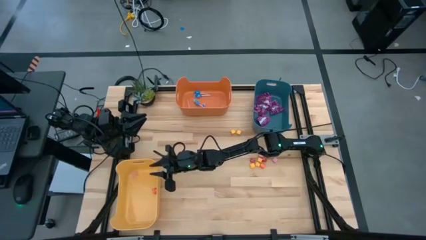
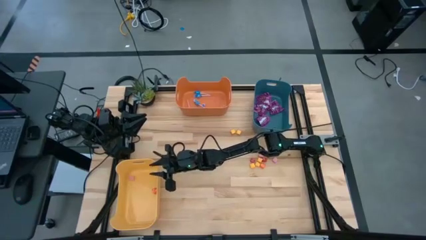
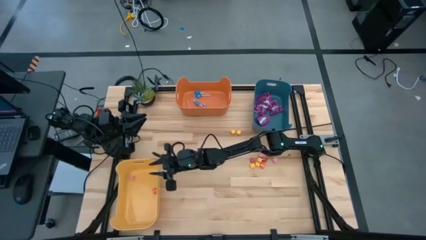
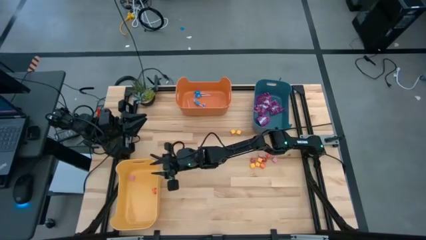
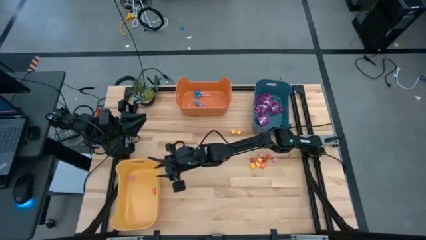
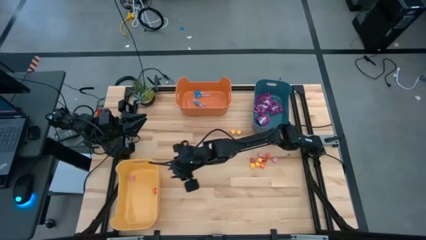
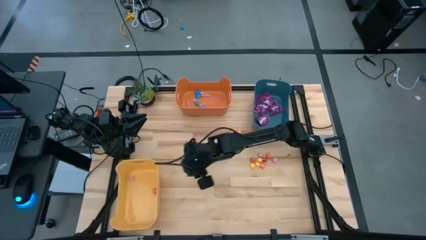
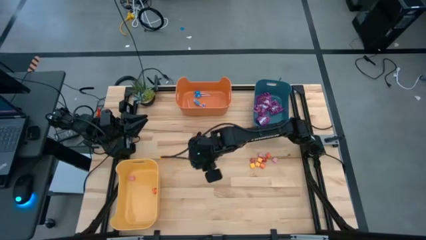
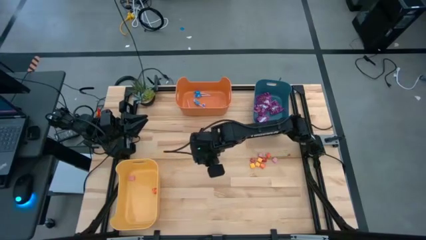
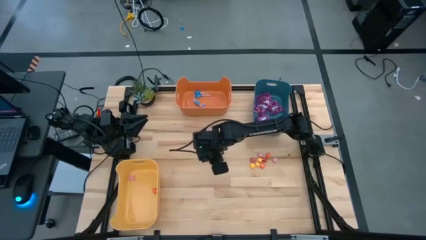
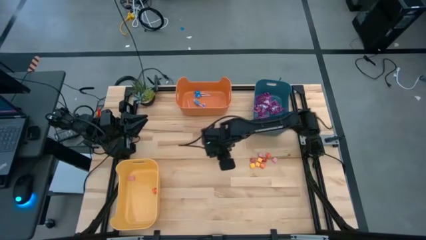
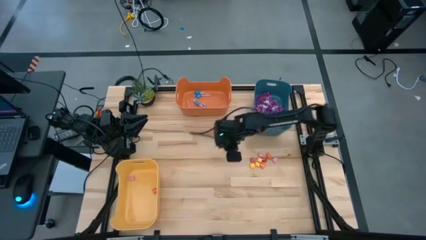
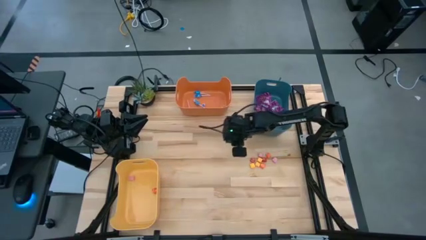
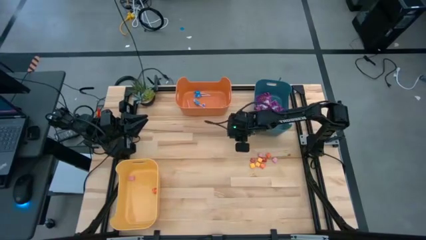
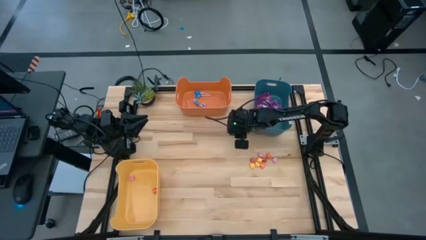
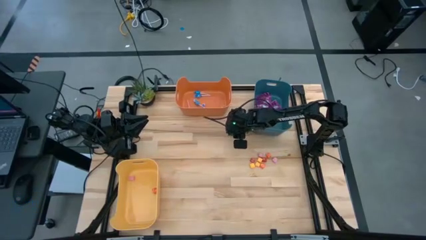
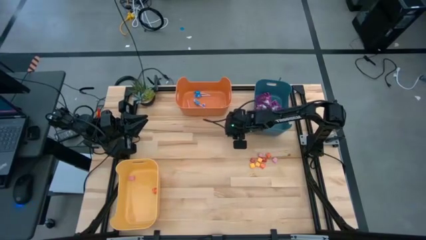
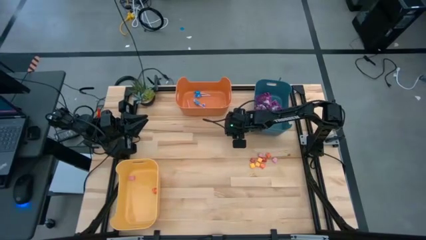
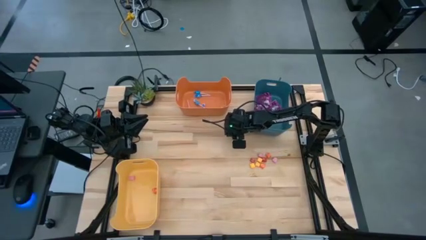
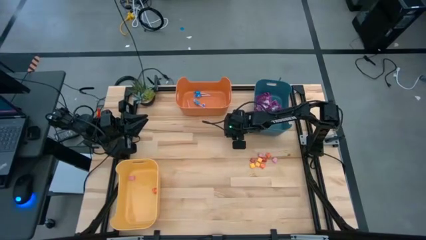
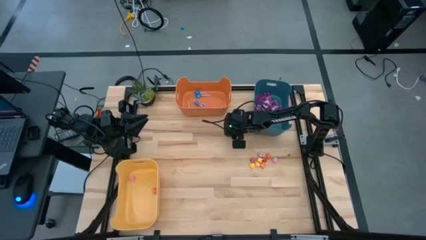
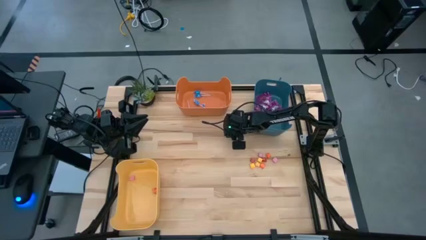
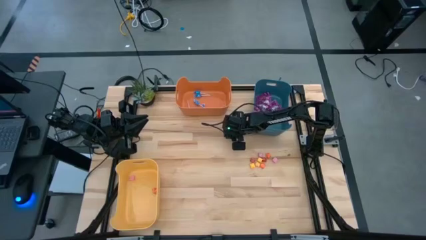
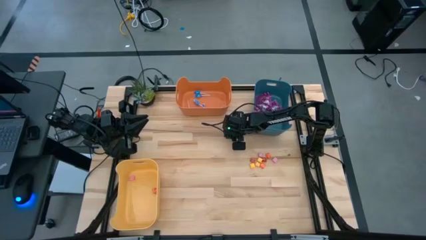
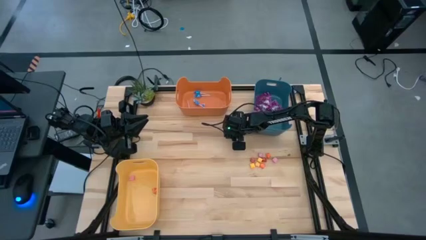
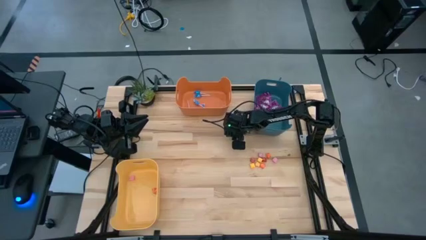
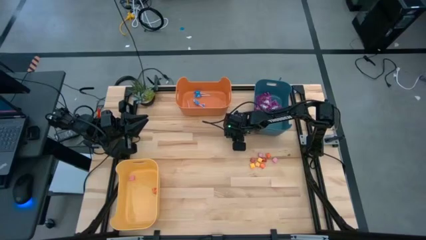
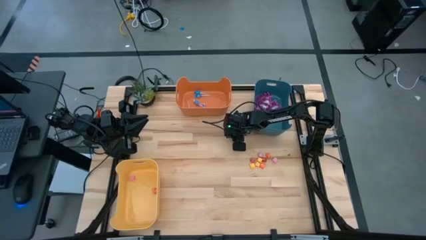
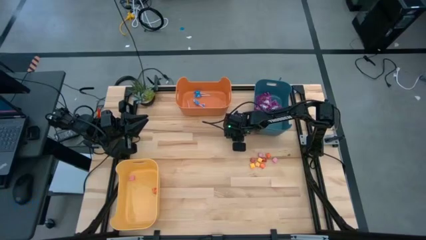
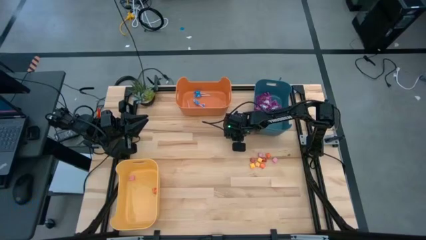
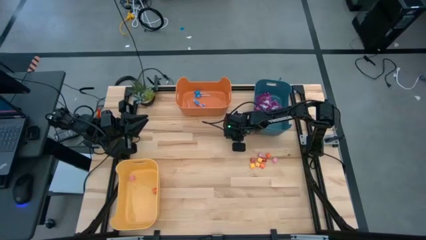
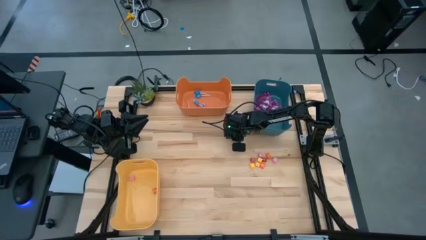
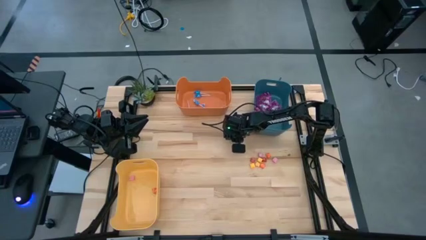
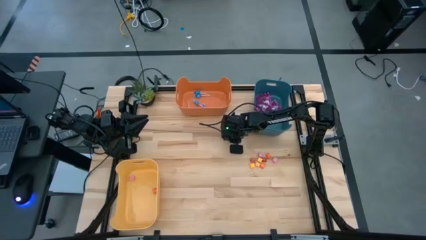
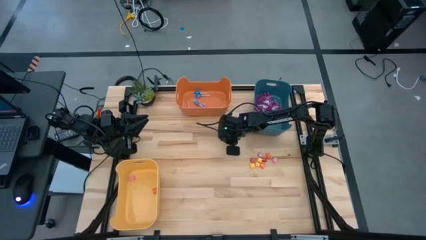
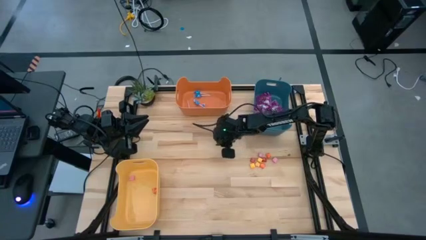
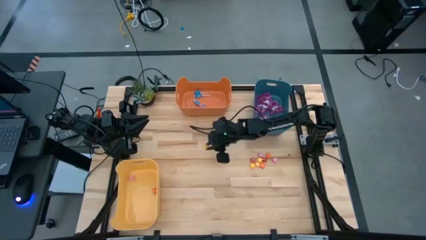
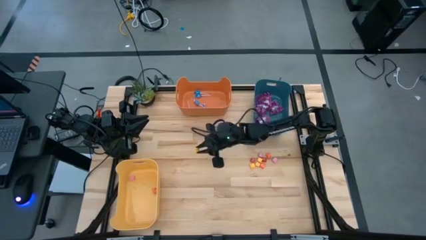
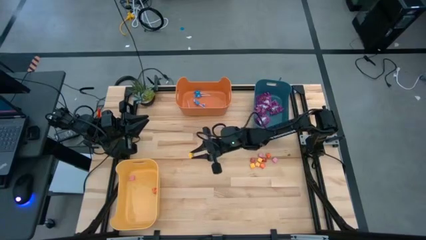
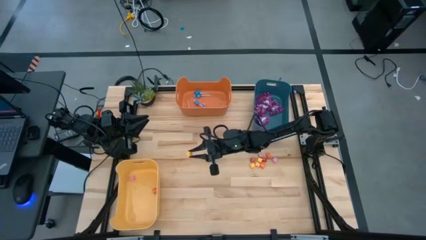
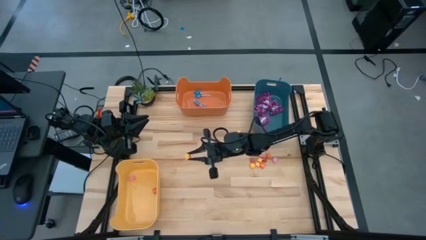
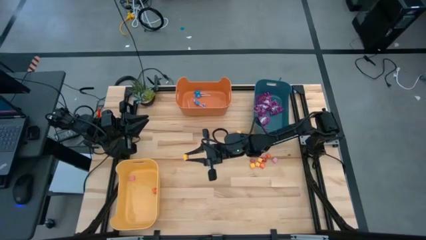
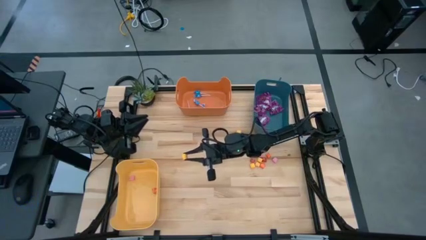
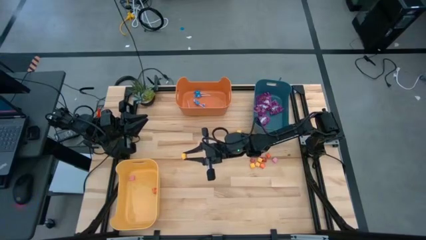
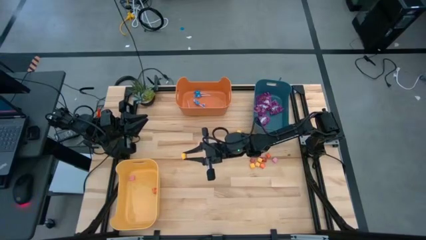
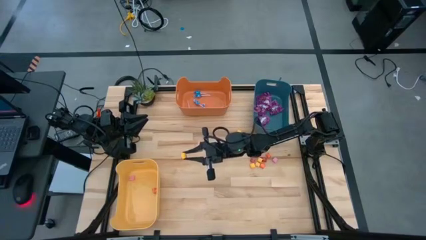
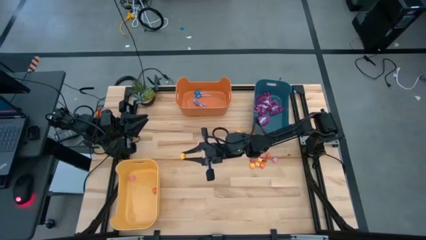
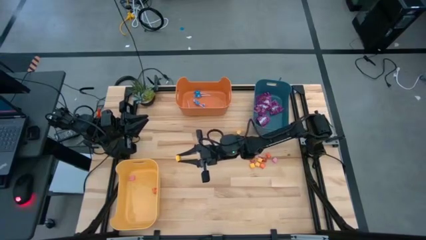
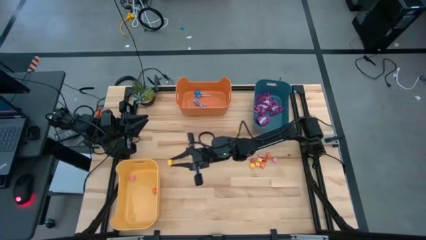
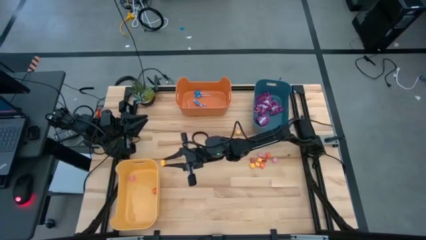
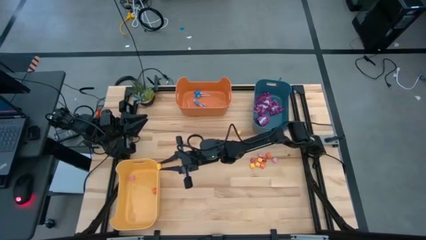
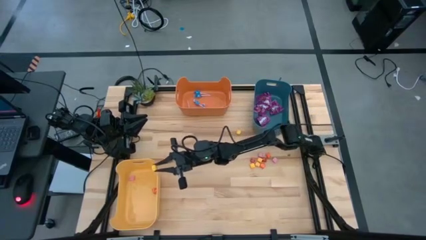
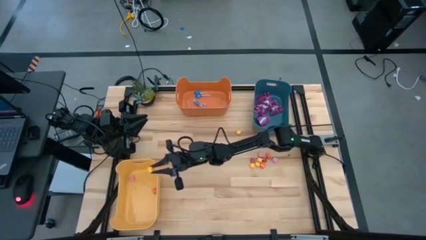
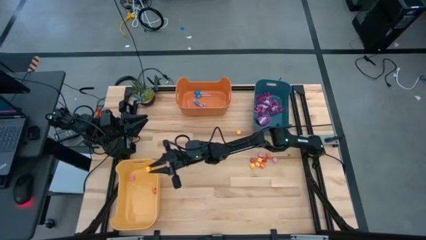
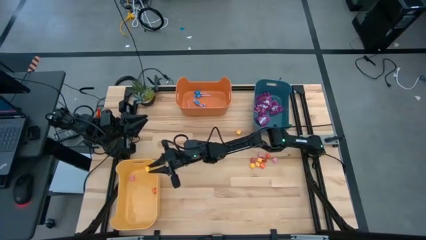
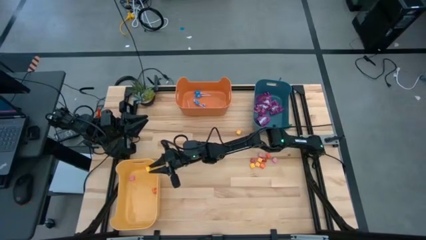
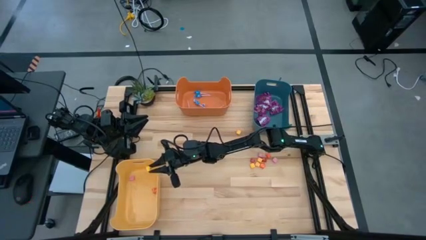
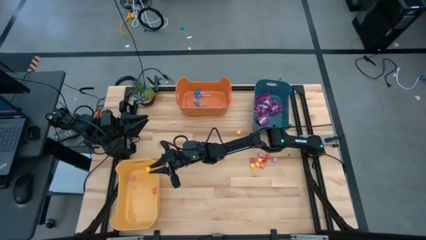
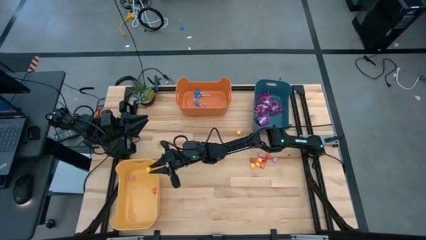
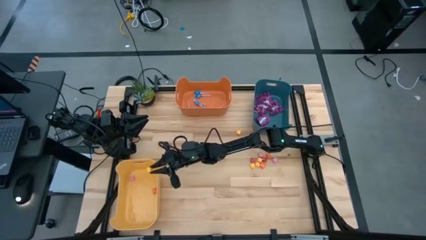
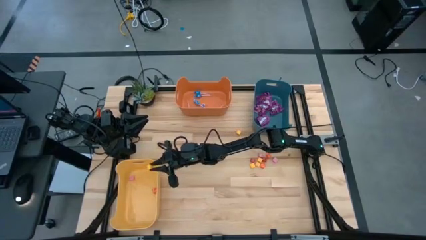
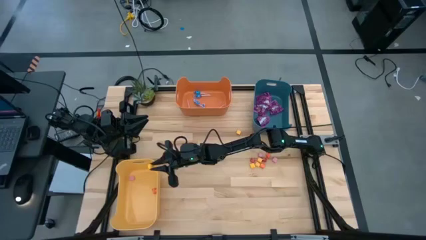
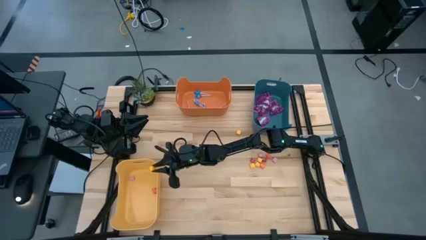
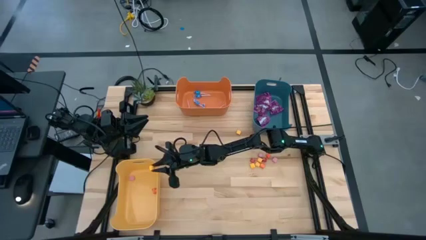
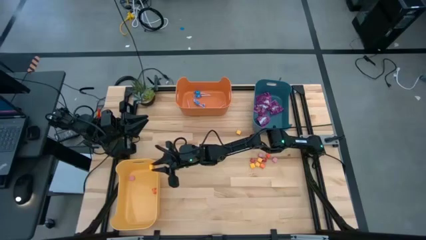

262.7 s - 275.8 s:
Task: Sort candy
Put the yellow candy into the yellow bin
